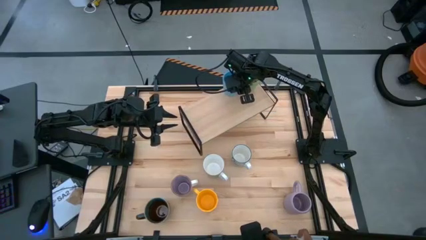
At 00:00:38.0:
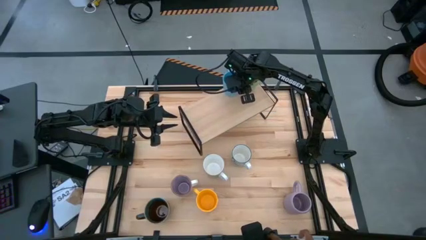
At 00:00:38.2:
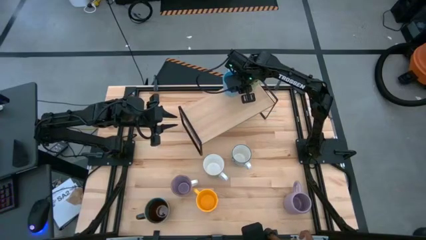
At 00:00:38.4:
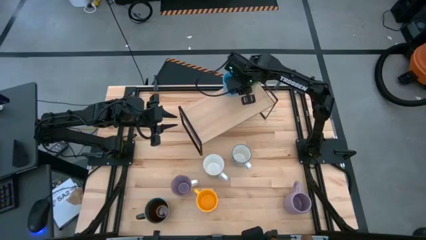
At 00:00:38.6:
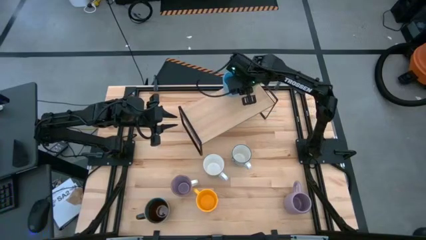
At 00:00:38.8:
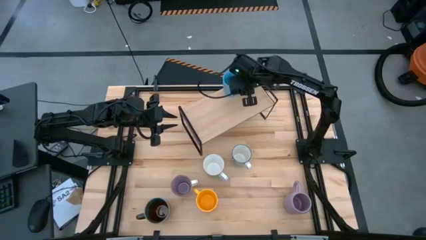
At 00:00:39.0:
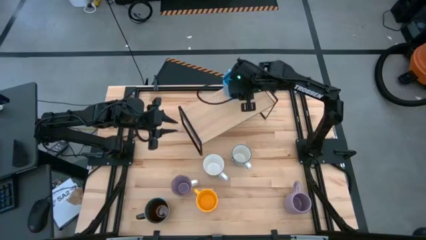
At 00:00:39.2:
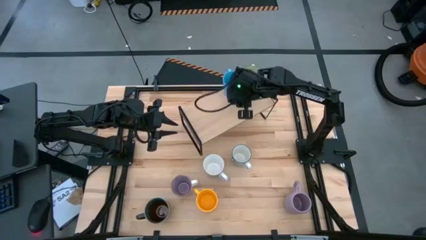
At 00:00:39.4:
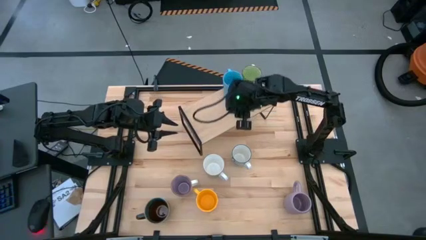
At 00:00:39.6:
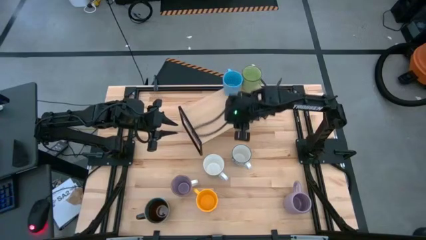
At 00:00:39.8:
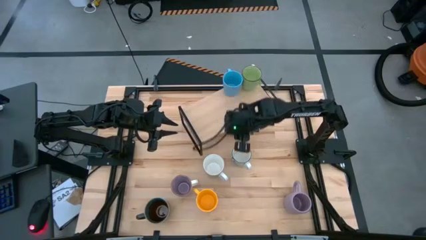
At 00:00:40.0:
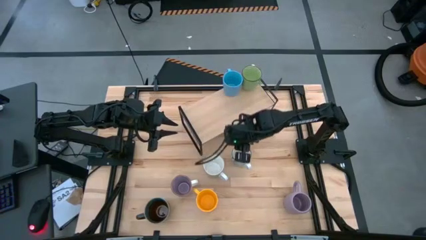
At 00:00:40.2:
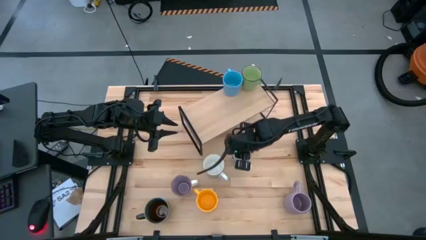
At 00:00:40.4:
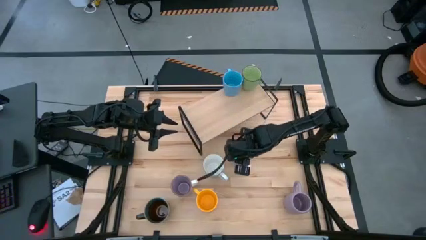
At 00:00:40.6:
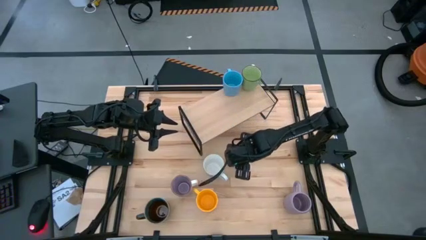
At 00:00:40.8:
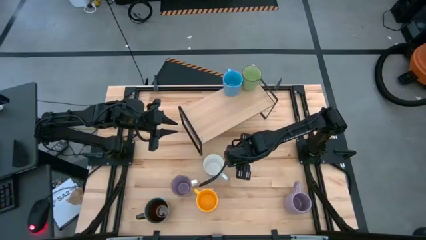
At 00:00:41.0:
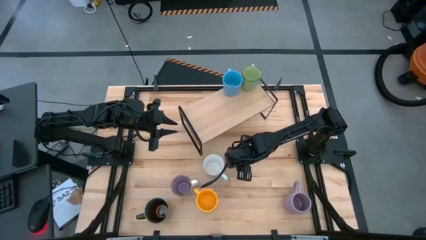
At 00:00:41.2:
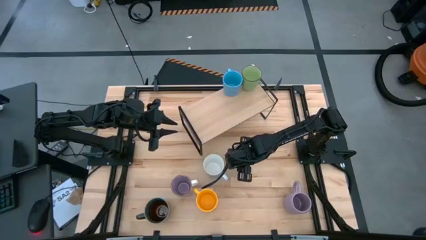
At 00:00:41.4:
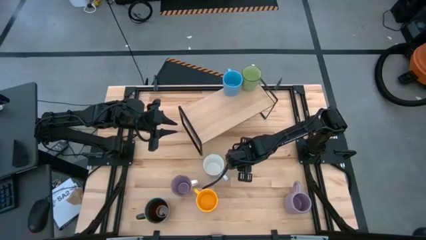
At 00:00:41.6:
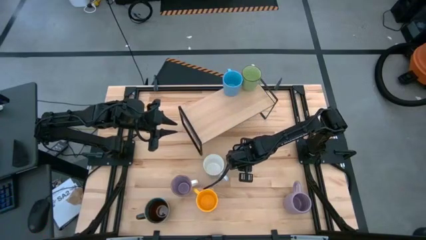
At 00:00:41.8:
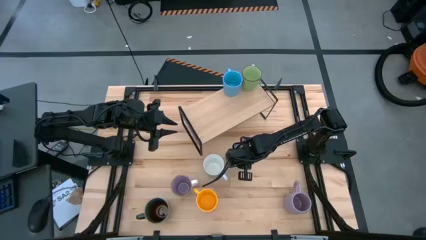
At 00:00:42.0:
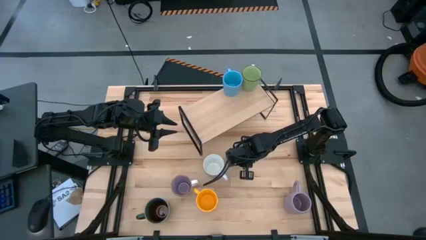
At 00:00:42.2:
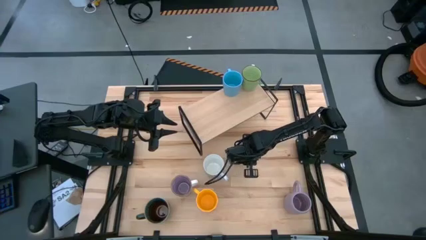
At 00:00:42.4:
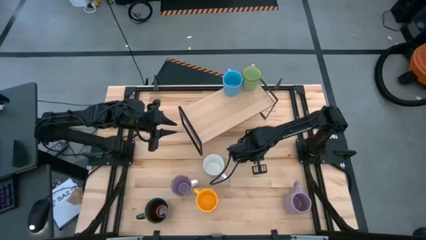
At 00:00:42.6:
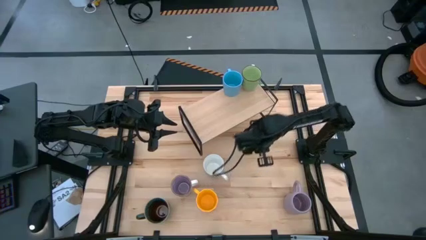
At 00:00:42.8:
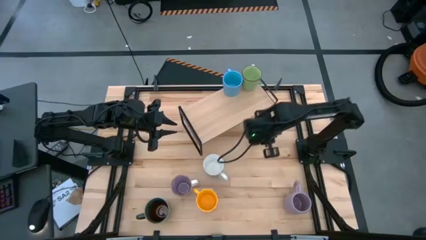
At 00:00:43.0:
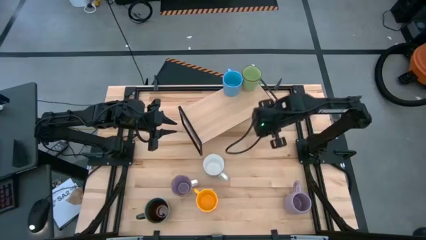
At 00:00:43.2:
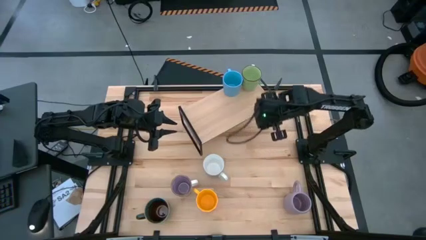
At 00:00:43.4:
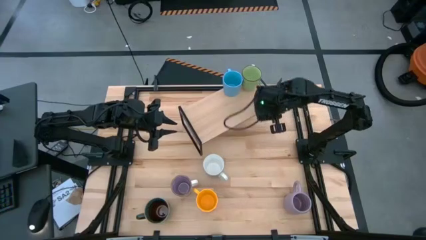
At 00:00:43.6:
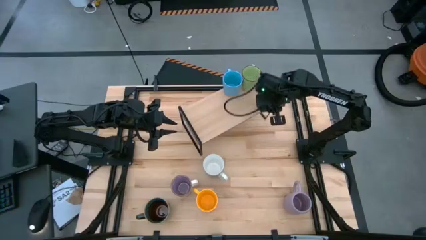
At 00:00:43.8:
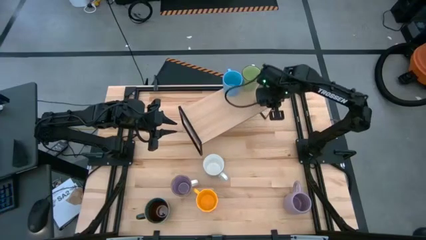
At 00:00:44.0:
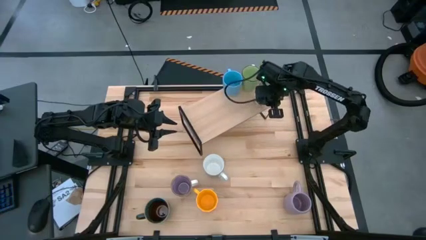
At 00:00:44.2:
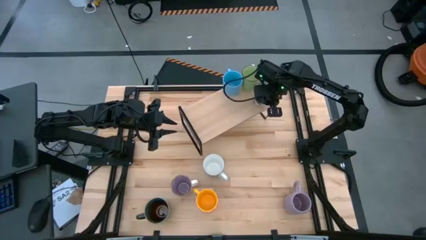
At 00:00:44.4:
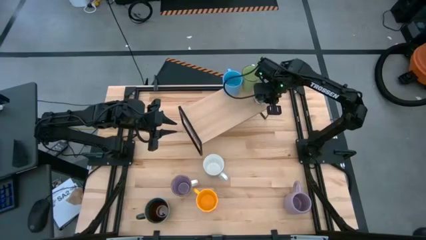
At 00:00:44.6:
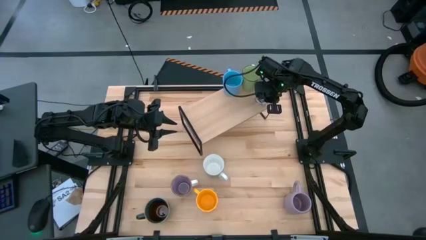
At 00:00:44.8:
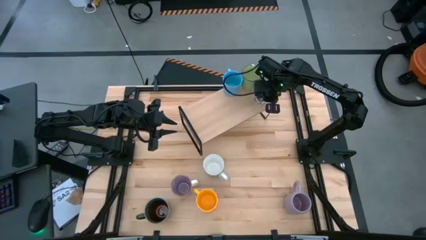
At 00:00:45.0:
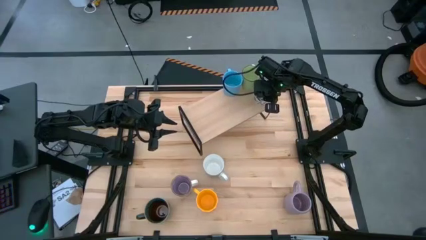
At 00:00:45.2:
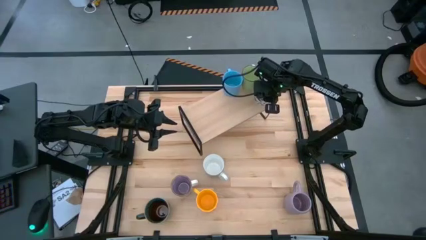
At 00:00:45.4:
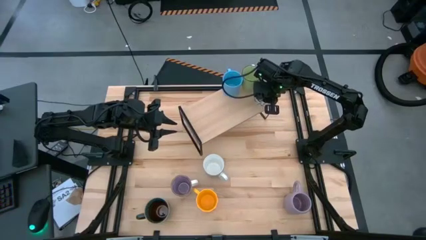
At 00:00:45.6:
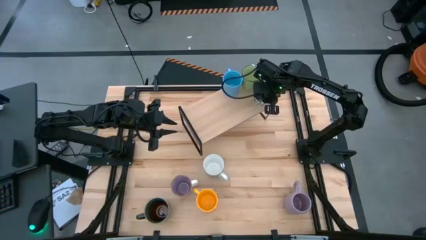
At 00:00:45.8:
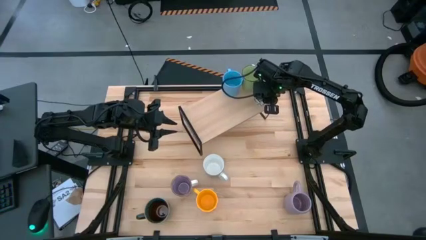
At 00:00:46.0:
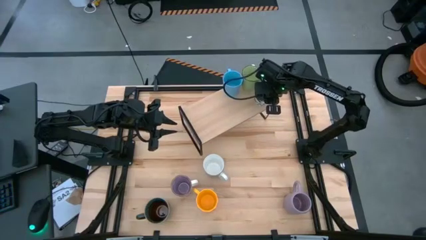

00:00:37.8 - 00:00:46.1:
Task: Place coffee mugs
Put the white mug on the shelf

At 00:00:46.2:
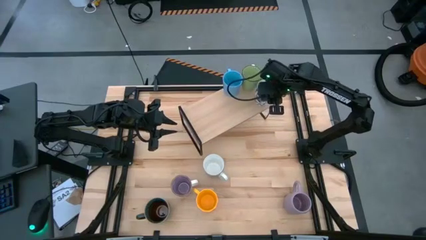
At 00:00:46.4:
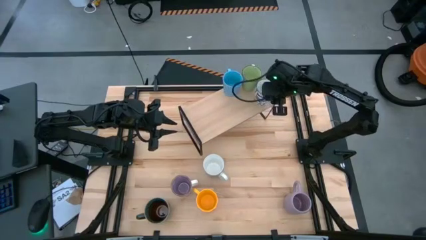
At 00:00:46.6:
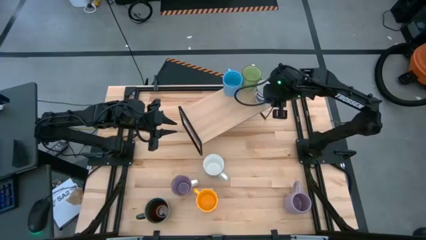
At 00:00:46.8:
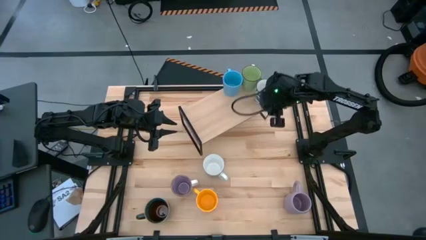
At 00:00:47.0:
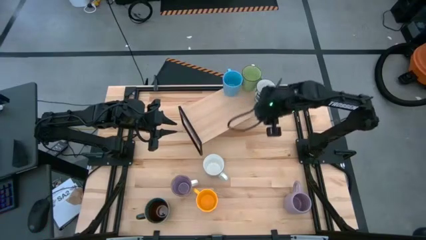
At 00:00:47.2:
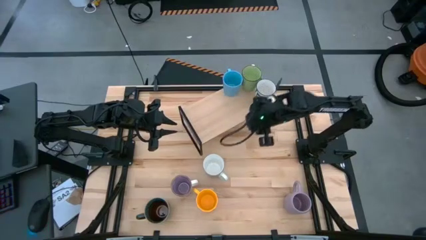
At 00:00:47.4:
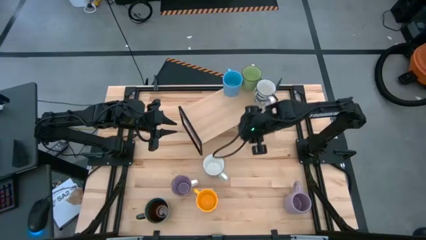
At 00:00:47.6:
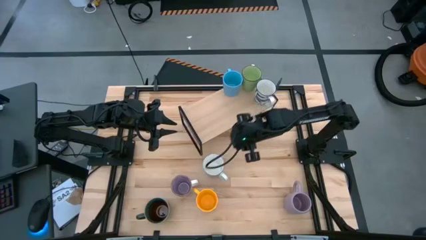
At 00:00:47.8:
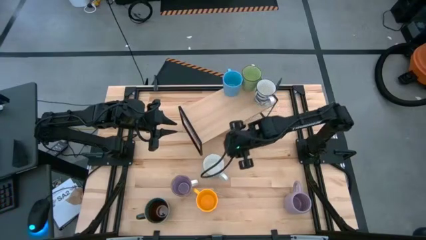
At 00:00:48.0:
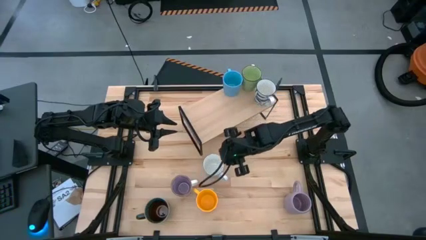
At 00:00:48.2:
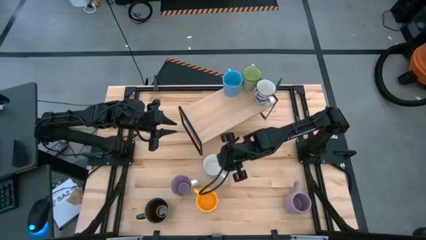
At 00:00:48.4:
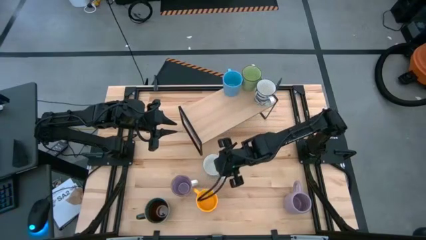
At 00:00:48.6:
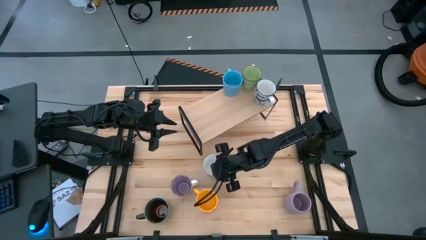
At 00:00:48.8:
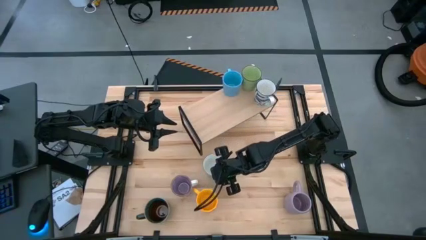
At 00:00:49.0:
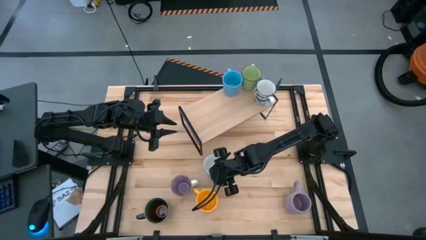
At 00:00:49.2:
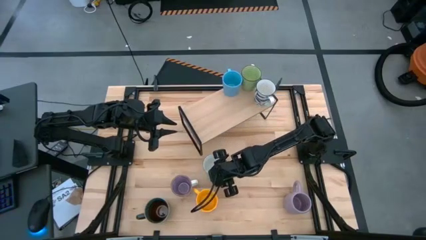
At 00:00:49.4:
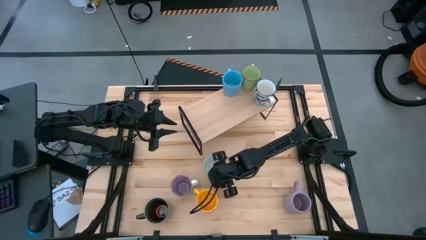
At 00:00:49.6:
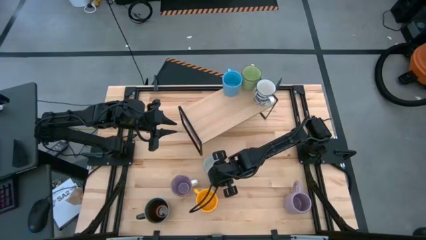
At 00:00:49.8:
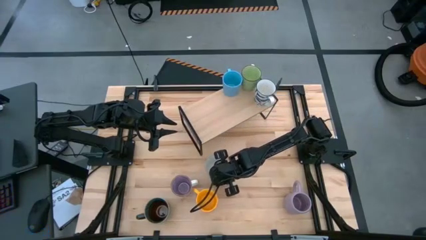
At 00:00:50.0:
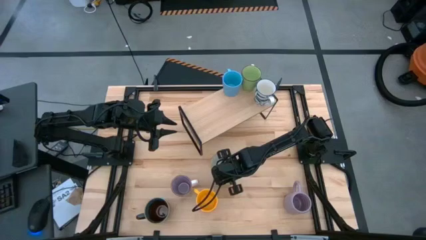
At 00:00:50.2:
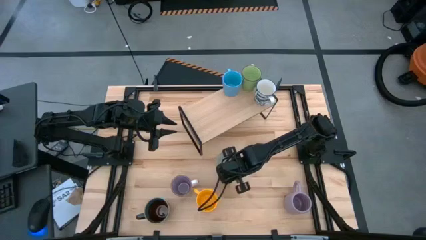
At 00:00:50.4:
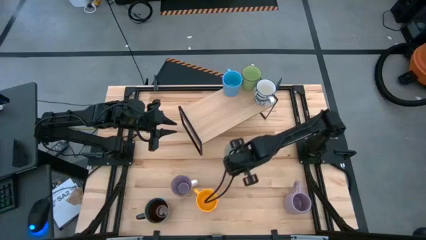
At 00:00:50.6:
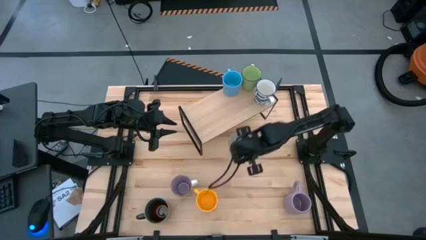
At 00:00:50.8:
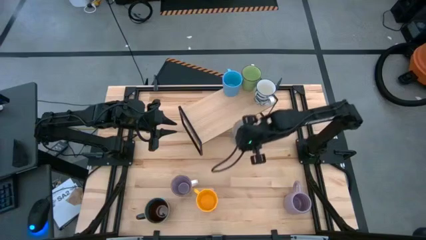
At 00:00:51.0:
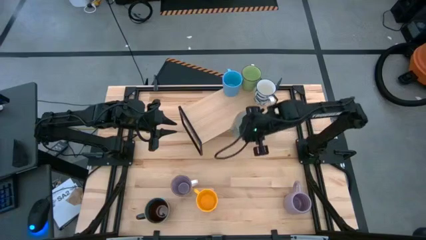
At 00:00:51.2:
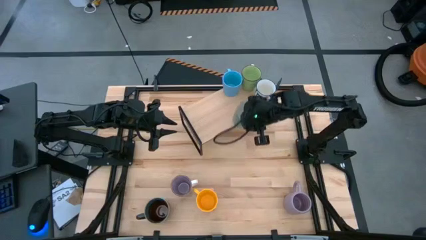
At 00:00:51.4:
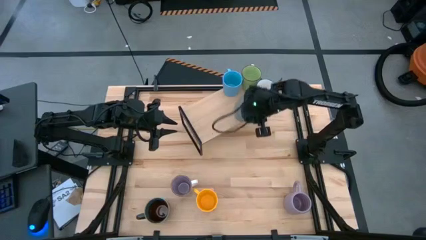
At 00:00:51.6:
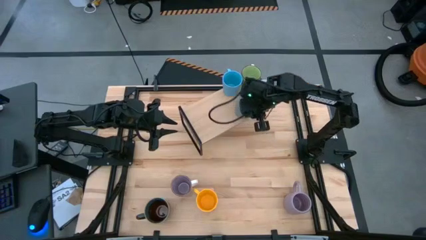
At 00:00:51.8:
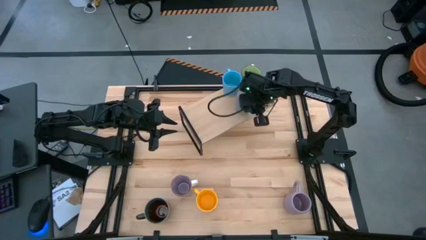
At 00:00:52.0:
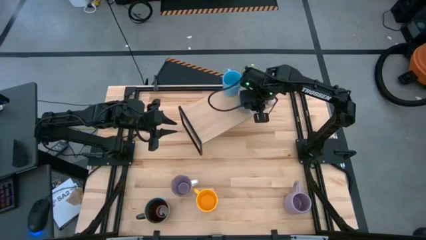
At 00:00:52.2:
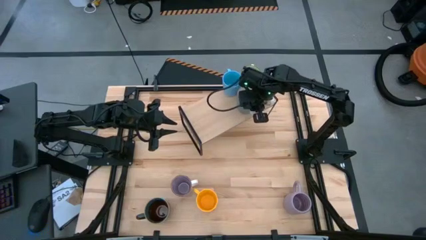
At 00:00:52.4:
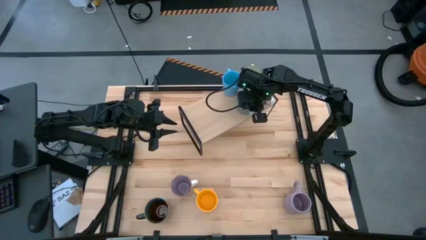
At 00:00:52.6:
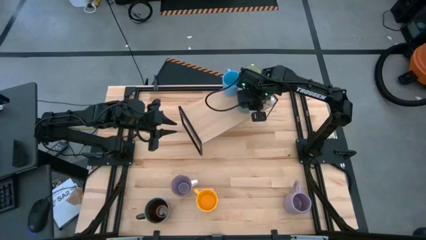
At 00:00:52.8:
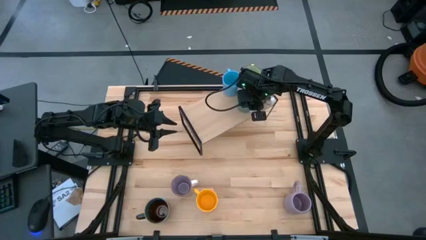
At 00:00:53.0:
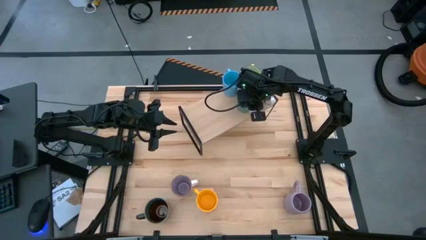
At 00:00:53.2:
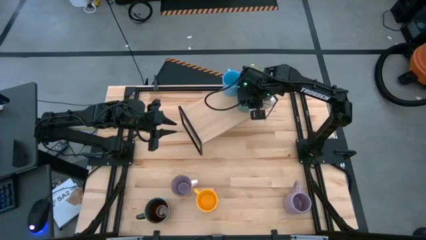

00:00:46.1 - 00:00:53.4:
Put the blue mug on the shelf
